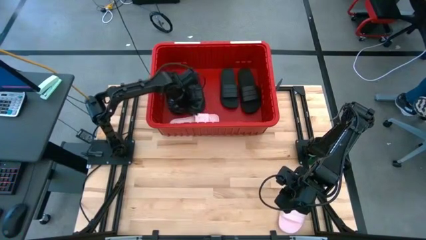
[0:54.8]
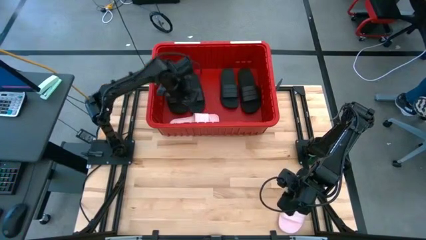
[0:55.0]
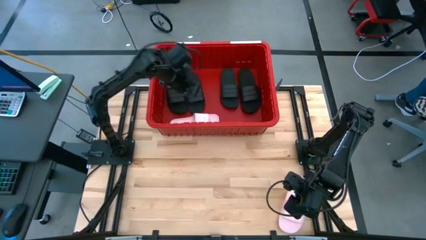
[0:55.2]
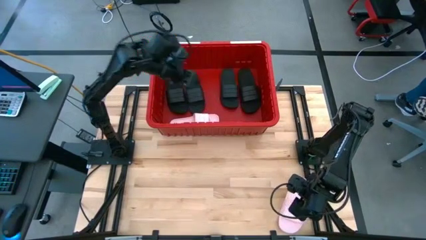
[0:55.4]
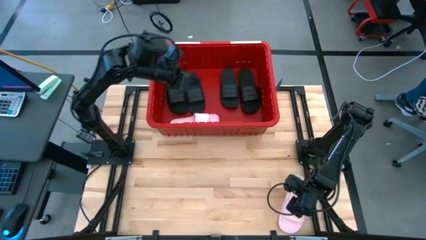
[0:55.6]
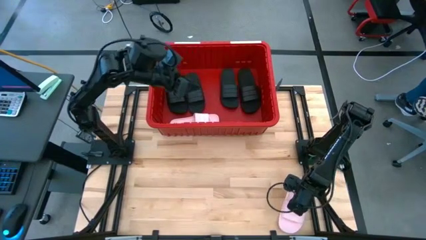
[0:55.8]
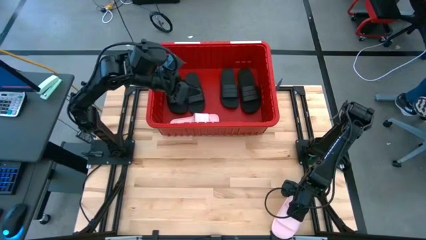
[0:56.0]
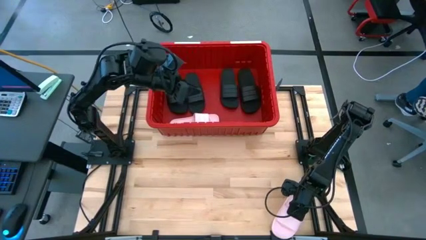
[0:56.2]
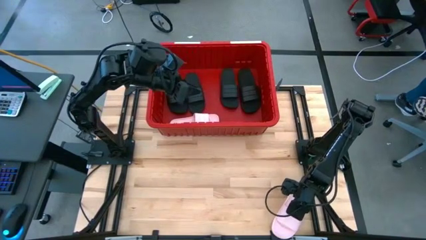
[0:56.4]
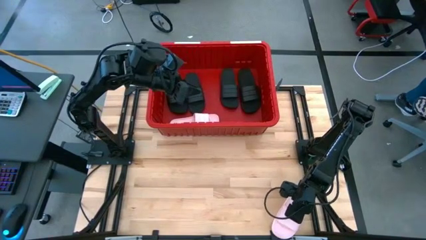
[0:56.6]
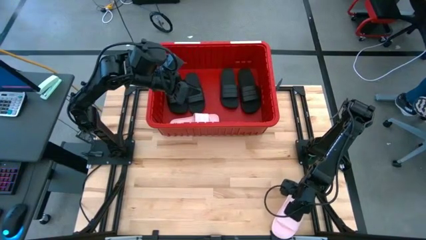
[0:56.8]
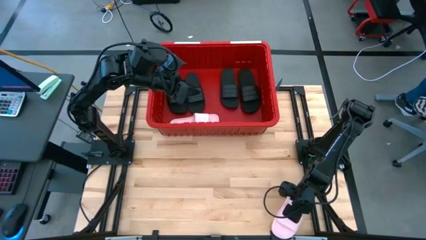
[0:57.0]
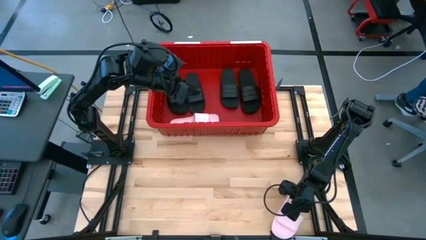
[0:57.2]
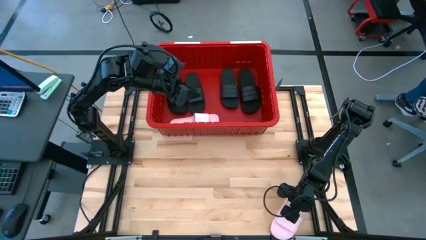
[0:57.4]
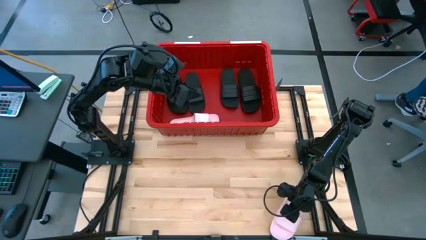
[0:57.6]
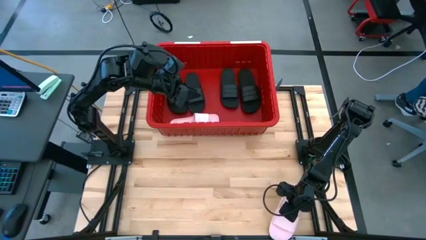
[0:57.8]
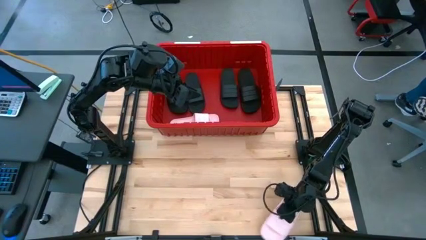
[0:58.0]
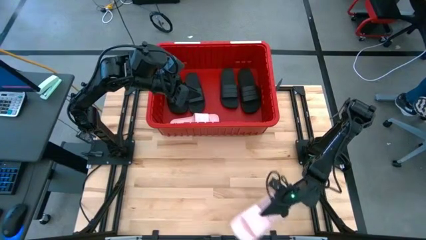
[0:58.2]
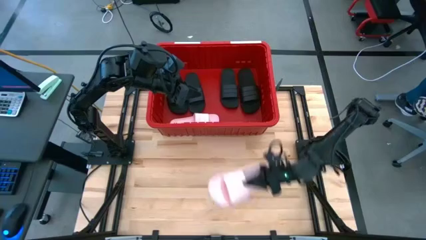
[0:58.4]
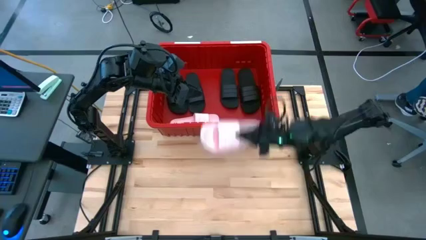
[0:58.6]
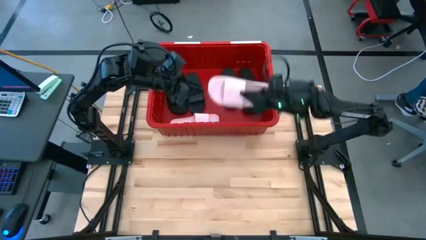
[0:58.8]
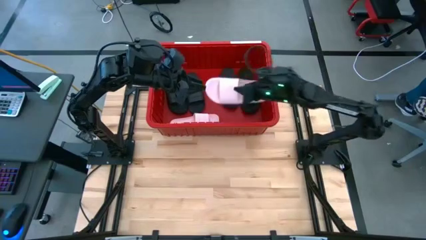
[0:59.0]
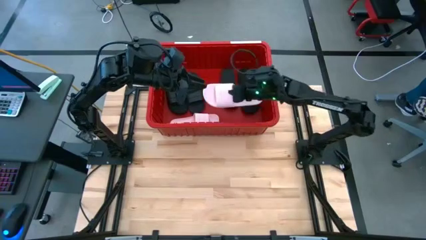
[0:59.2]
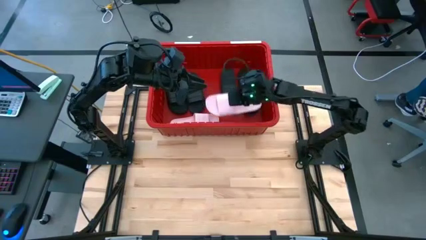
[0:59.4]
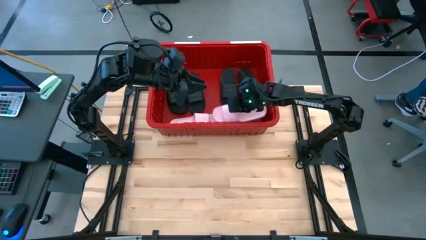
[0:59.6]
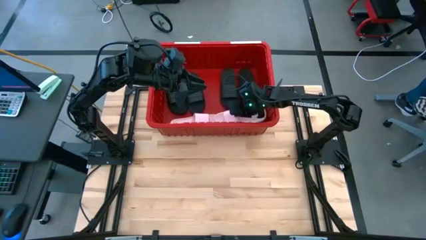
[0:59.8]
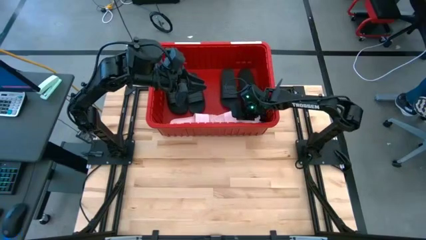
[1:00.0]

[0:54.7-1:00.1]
Task: Pick and place slides into bin
Put the pink slide into the red bin

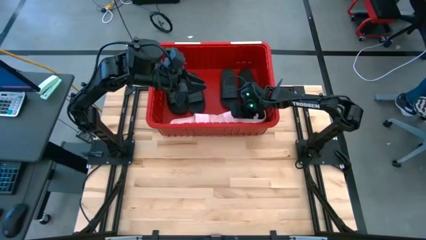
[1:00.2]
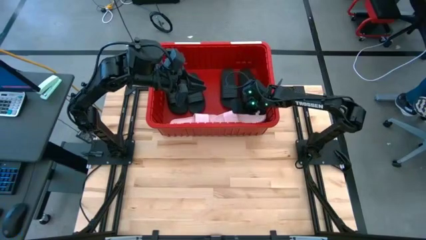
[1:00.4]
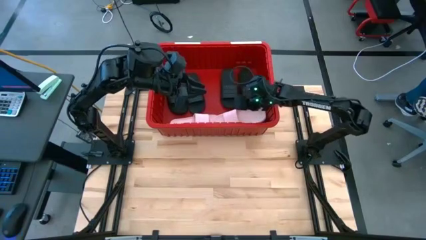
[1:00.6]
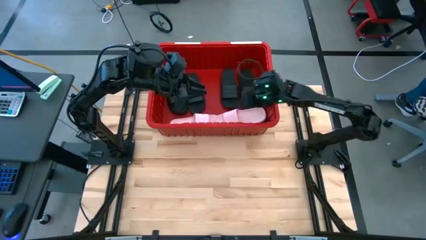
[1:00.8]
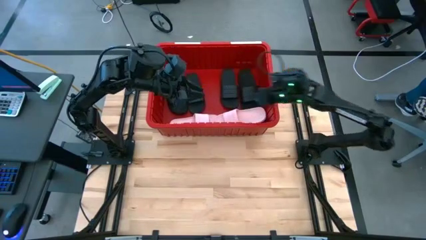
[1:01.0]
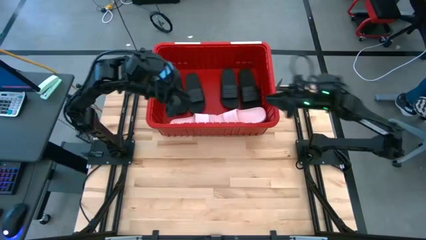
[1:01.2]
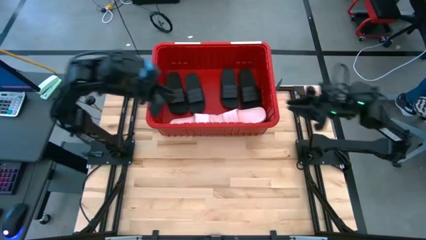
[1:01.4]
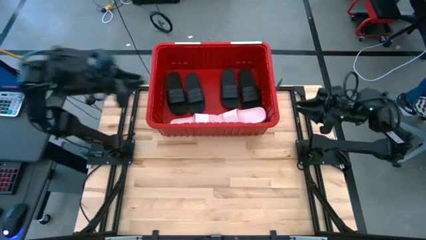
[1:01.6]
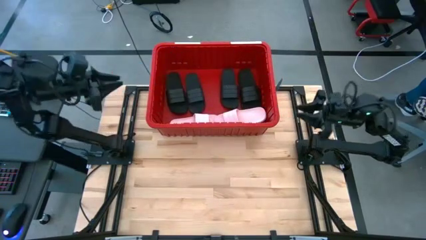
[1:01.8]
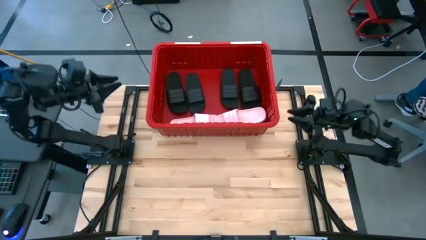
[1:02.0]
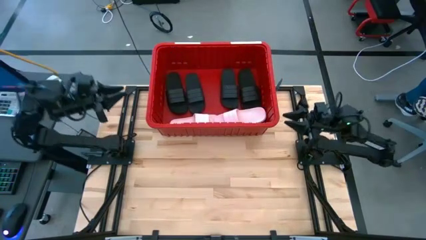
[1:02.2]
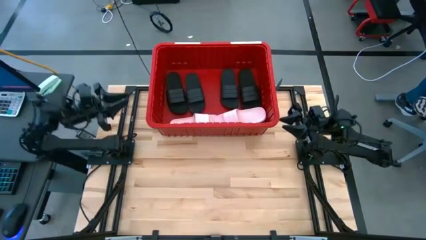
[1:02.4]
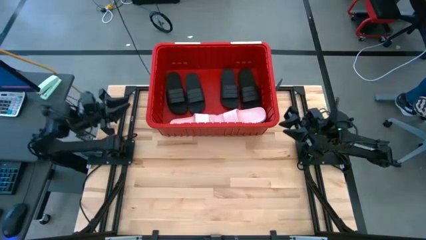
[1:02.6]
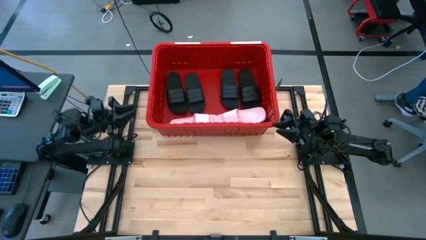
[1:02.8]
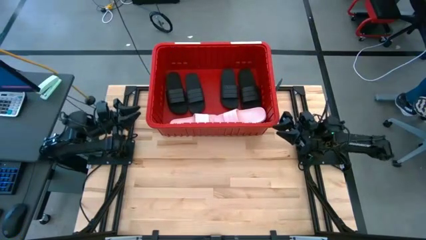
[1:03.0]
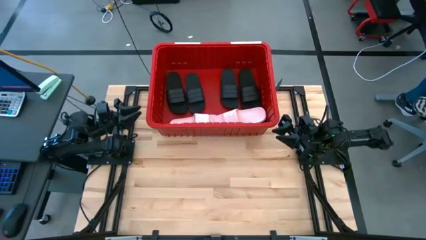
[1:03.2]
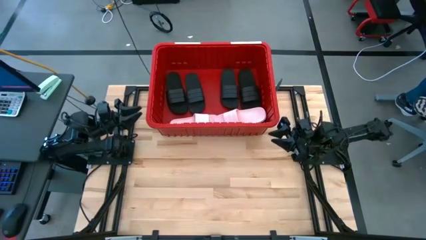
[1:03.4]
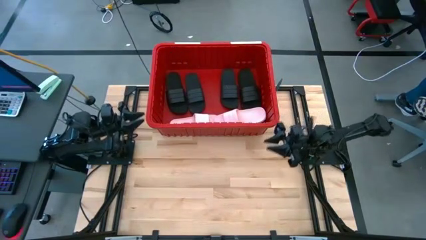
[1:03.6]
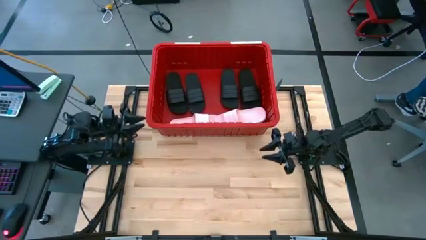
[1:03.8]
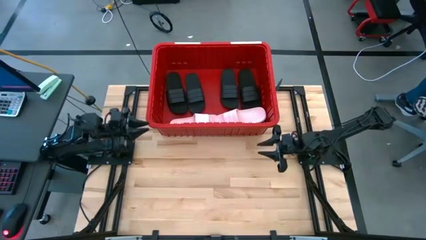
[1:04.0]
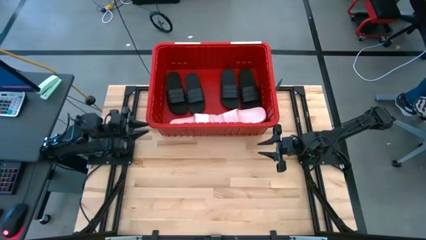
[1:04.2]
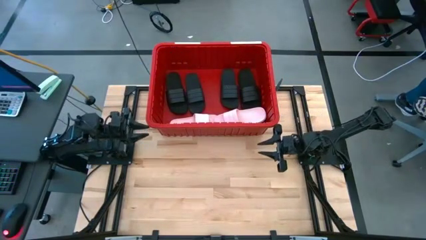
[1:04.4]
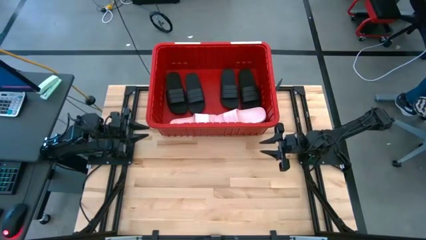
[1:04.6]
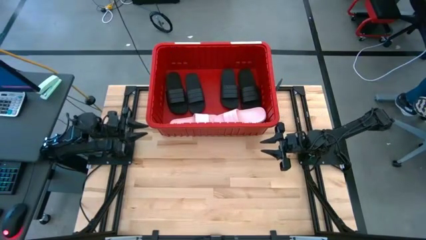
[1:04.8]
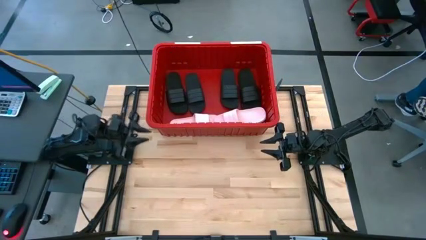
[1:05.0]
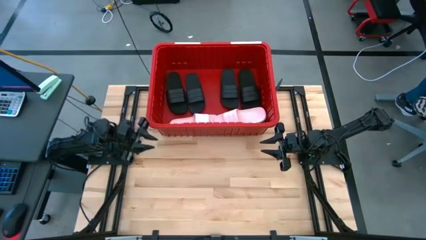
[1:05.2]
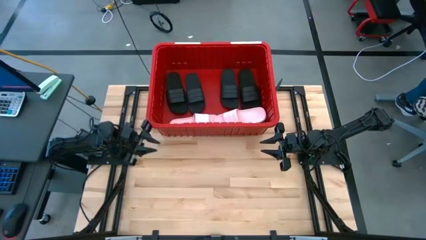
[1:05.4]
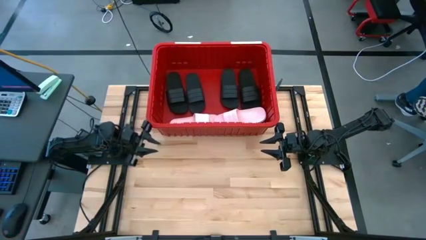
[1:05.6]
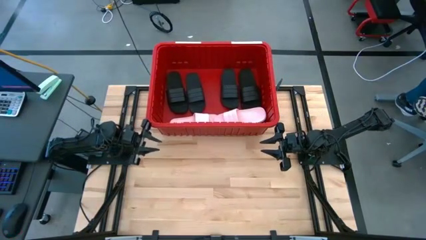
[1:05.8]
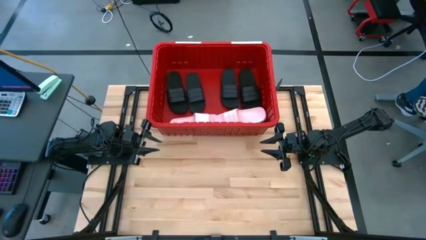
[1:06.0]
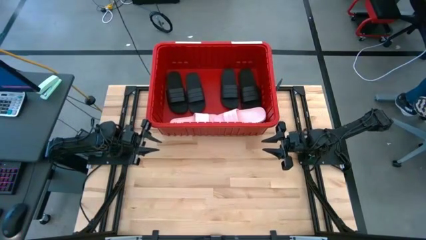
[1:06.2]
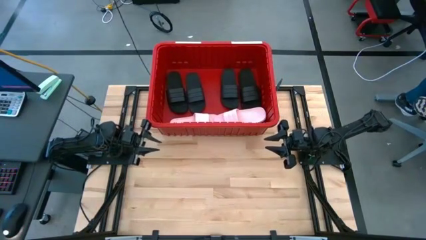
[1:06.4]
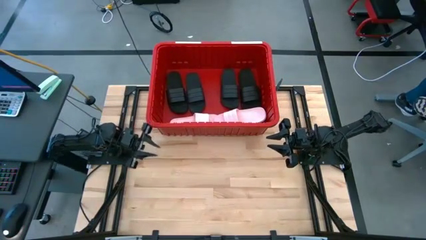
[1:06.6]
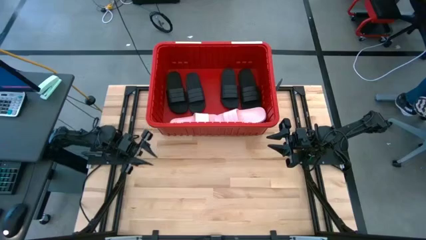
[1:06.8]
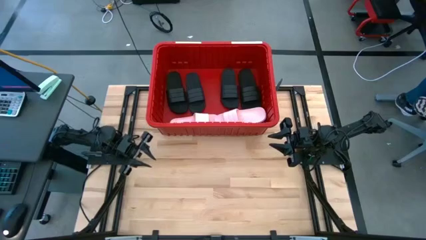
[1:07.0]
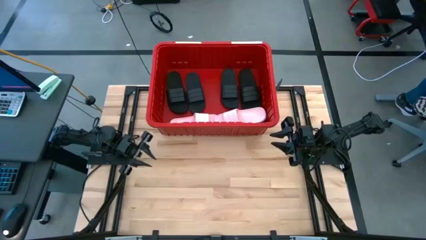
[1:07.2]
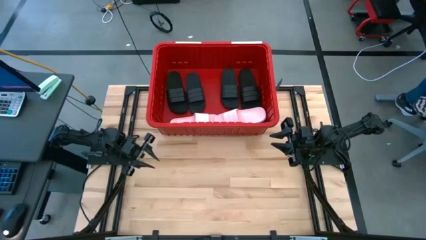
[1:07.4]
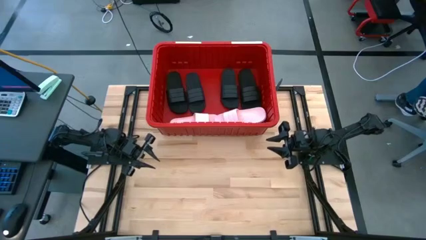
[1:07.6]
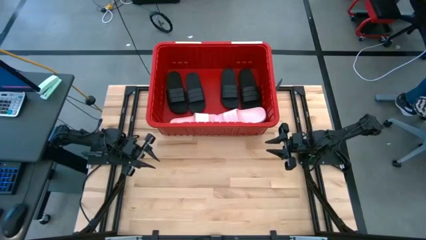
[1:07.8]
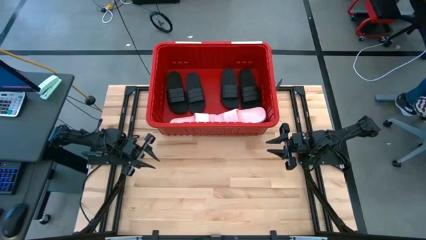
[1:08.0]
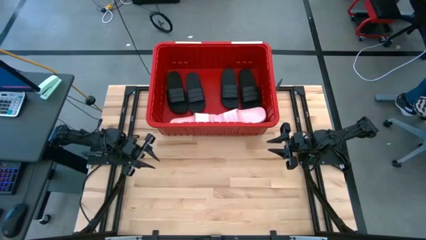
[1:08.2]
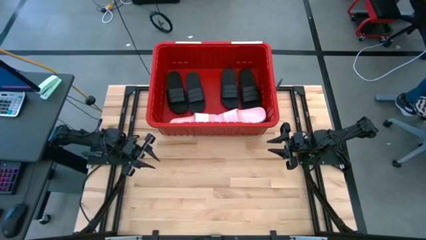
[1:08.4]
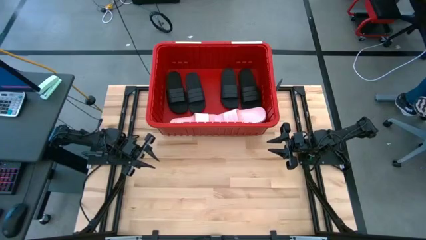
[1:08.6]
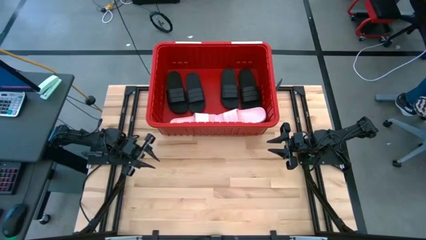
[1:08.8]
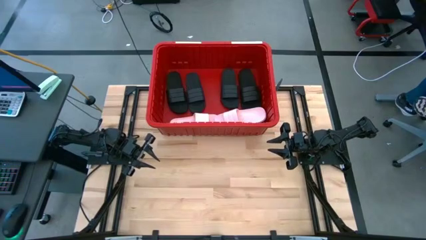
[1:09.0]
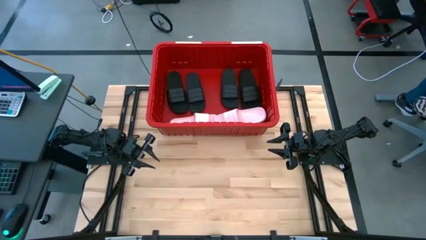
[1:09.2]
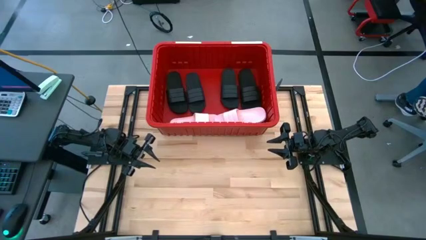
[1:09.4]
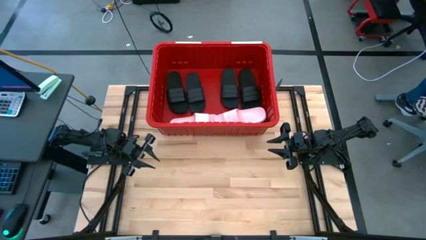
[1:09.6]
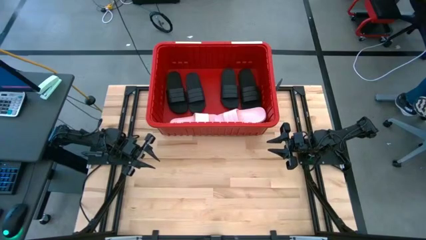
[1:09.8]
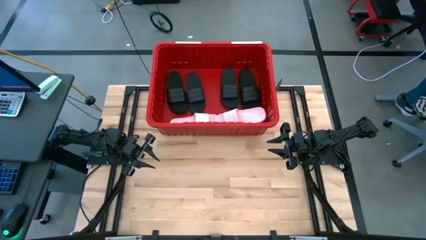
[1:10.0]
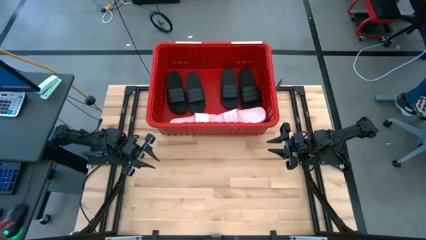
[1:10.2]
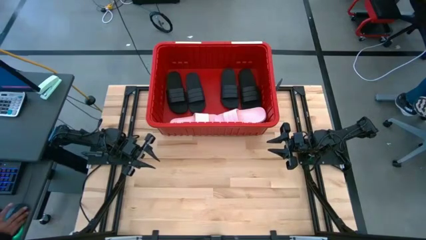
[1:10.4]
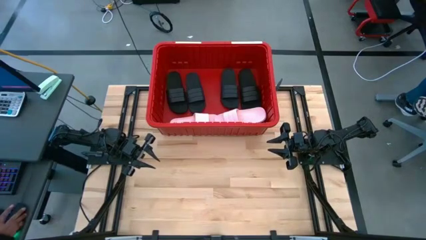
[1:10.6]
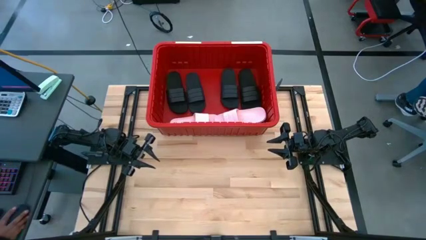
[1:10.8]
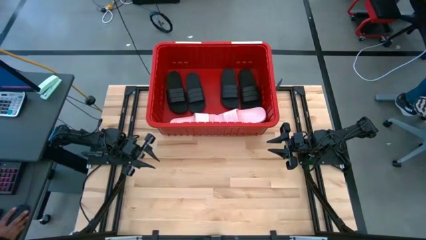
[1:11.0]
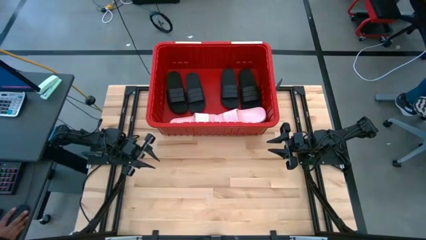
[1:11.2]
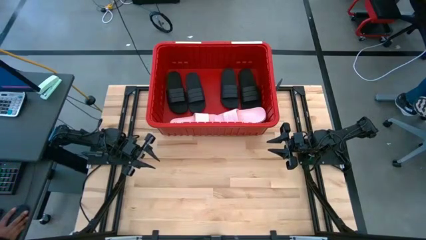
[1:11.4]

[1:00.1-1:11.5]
Return to Home Position
